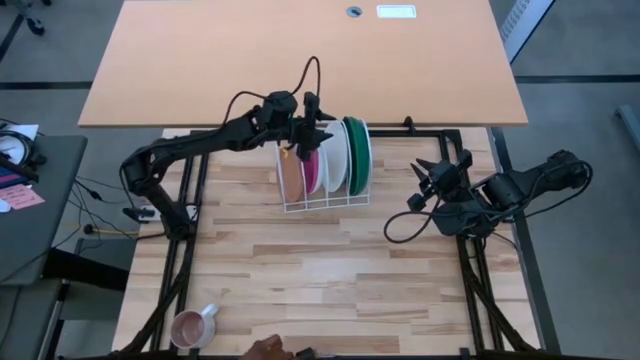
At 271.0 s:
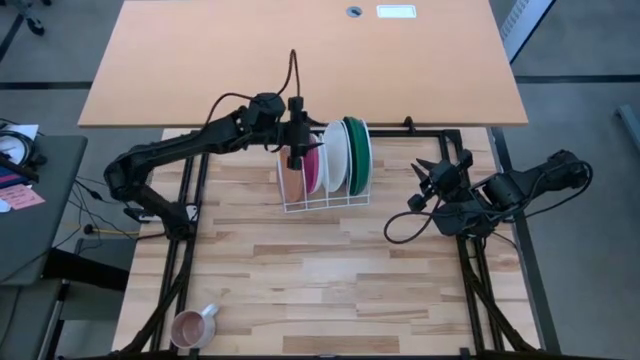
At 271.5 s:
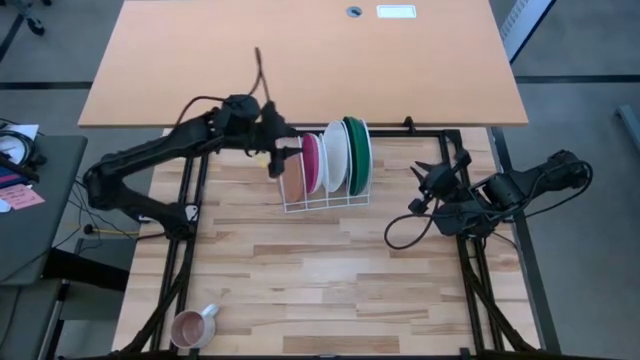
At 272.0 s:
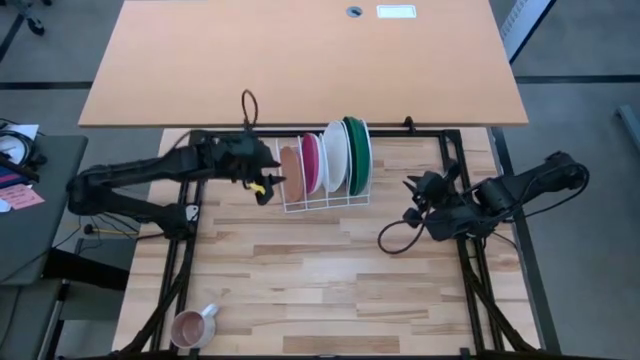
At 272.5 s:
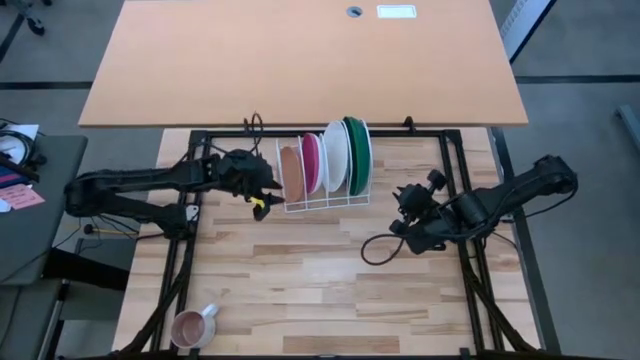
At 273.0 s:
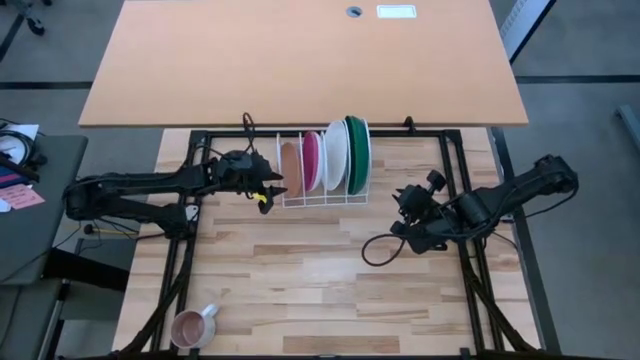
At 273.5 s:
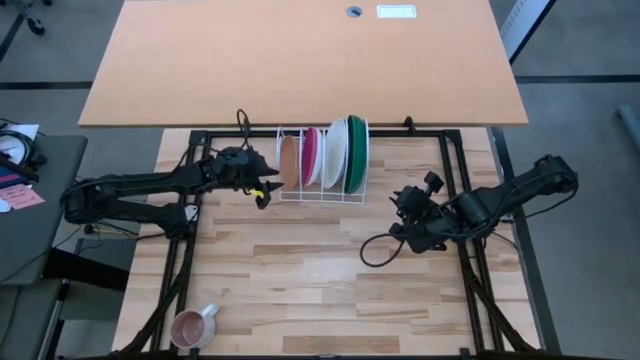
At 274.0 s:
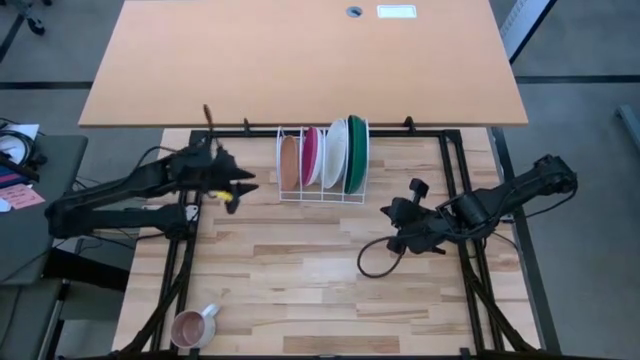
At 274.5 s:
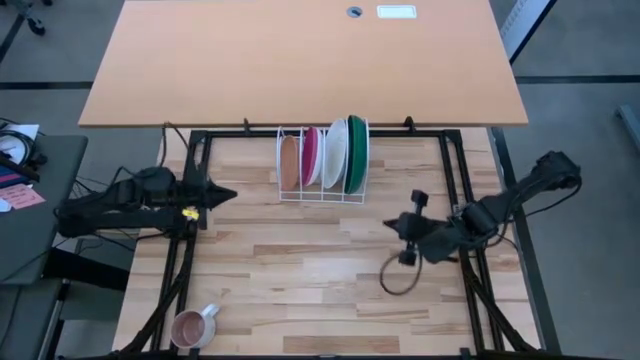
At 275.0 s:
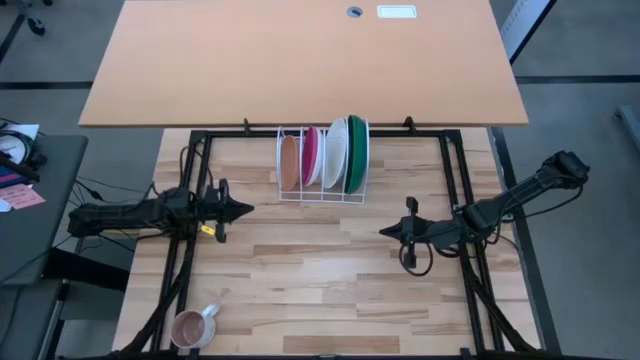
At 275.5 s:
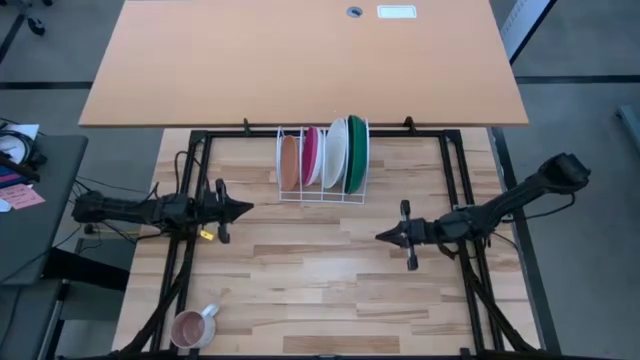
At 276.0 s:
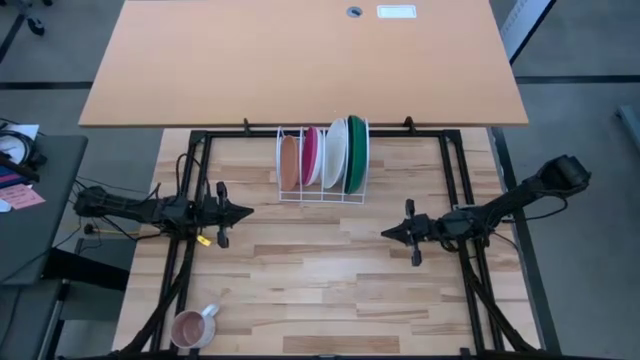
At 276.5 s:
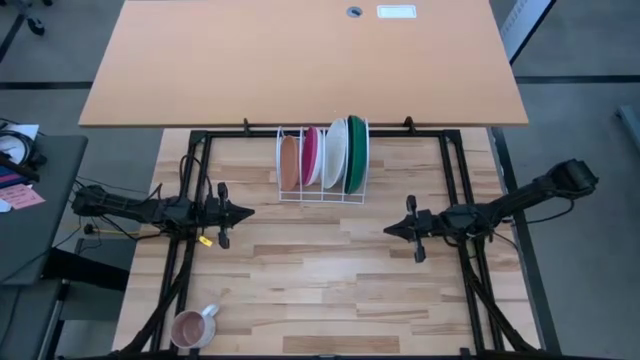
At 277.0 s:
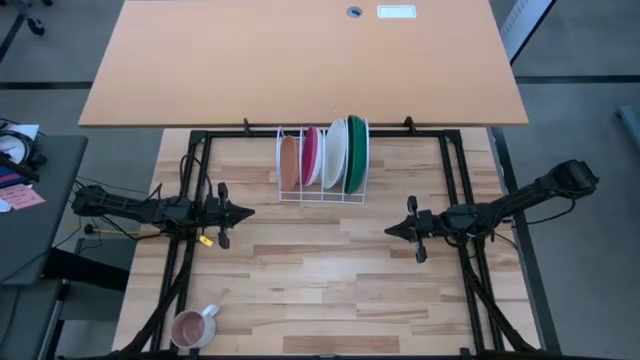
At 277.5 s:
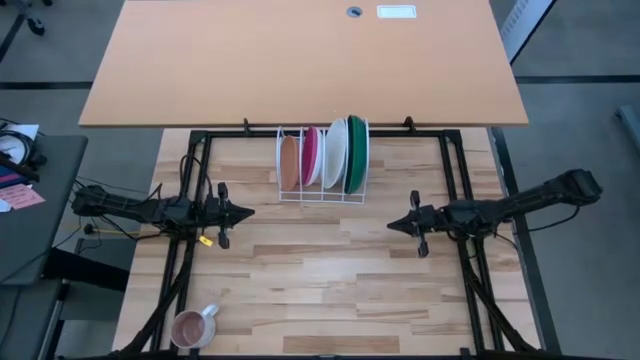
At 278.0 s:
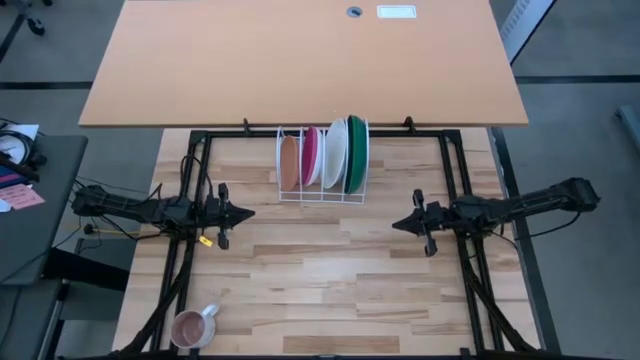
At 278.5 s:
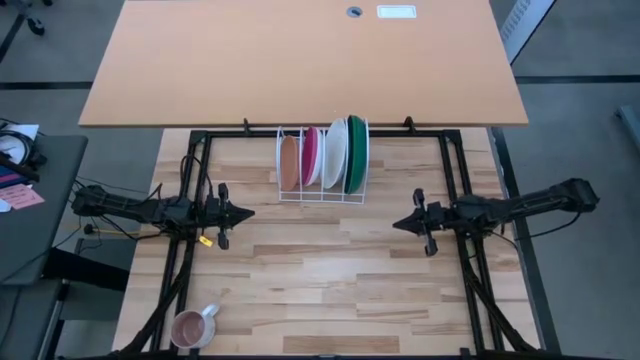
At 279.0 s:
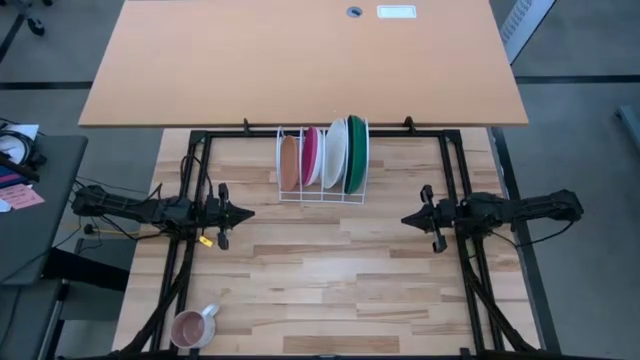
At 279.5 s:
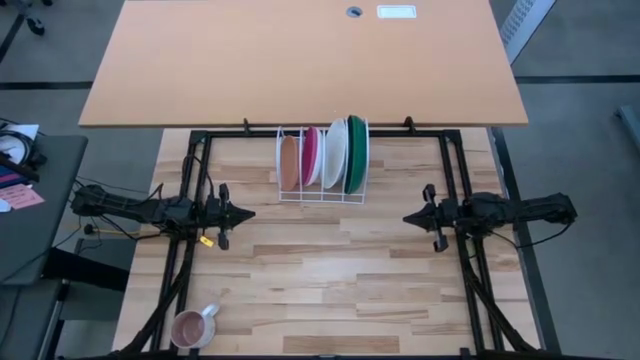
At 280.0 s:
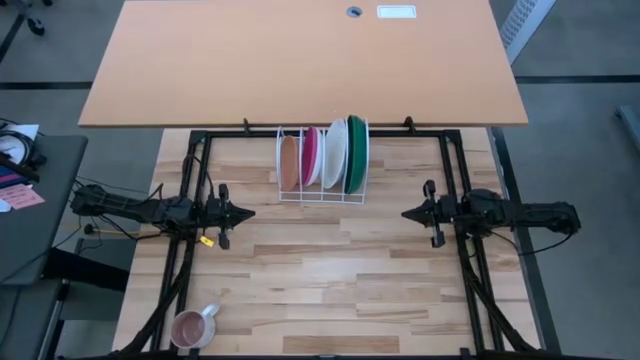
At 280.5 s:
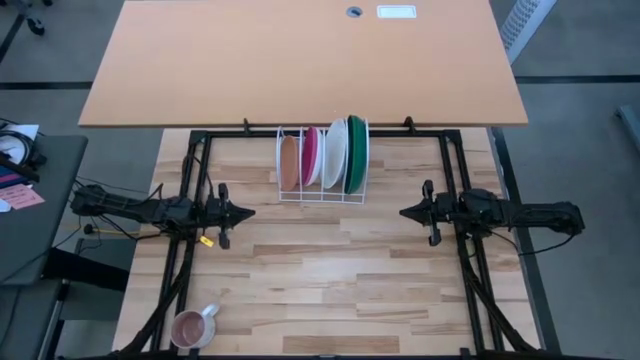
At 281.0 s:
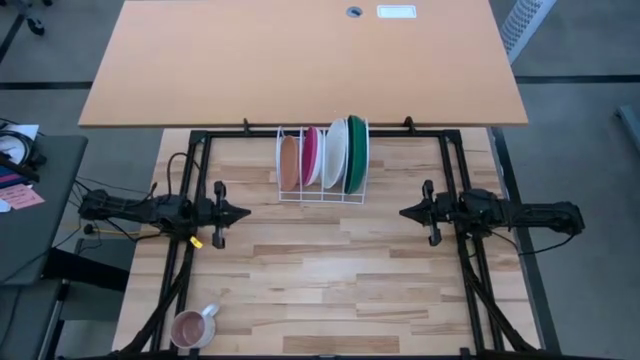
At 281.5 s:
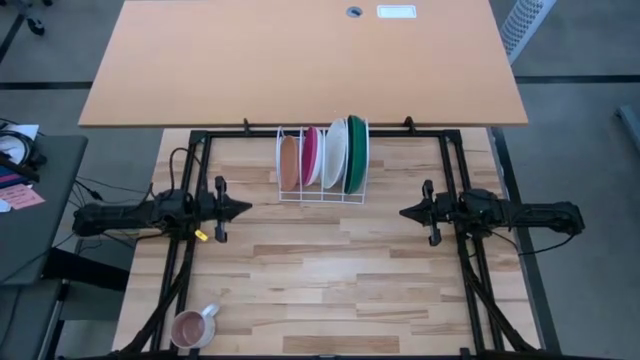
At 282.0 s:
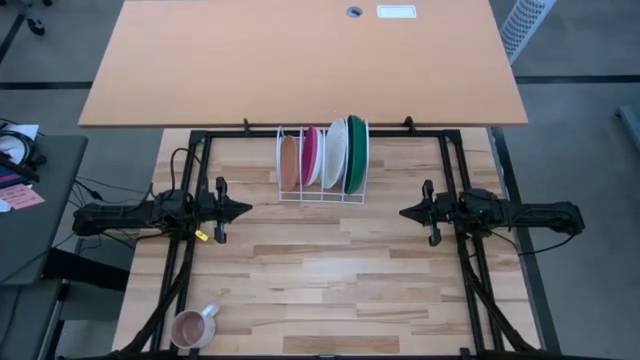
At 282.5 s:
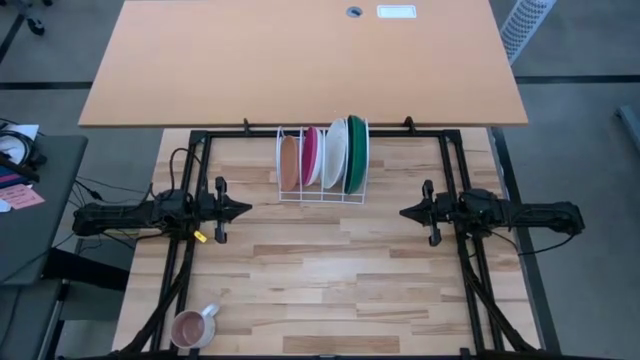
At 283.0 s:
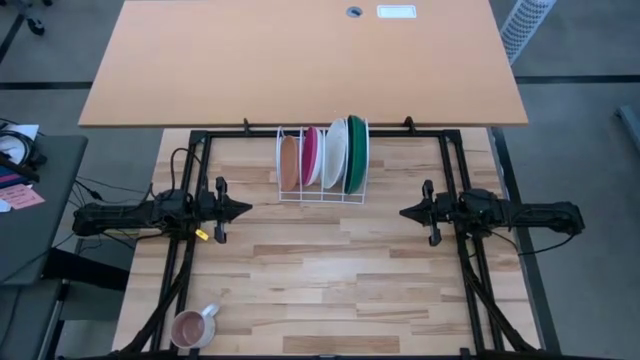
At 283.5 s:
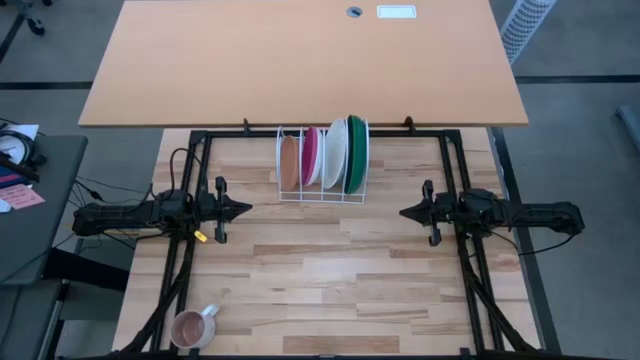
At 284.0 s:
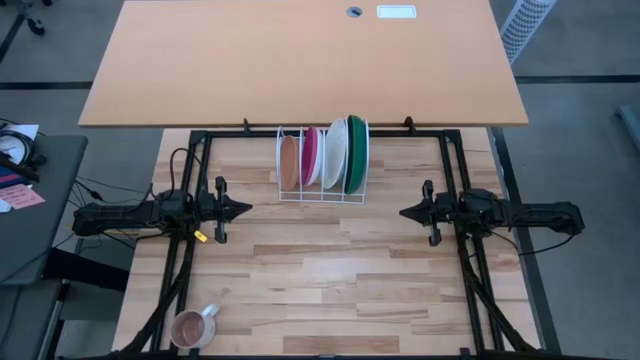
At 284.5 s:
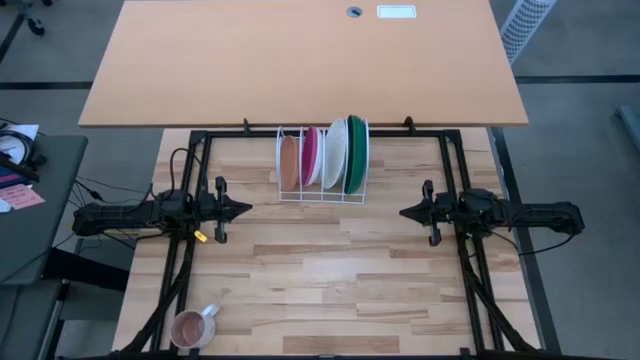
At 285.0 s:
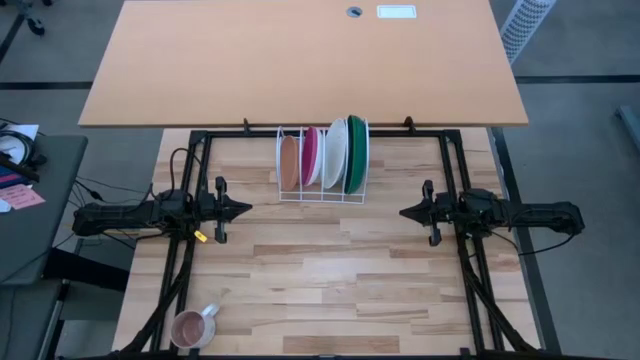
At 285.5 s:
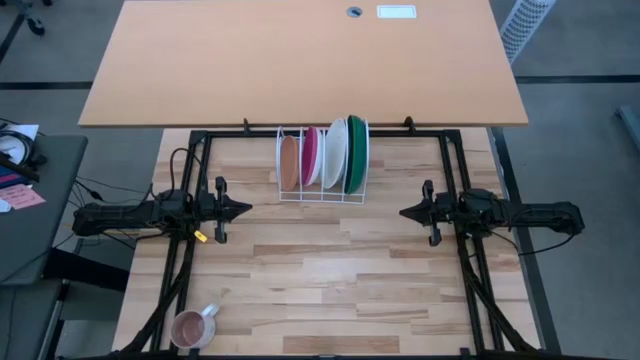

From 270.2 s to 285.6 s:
Task: Sort dishes
Return to Home Position

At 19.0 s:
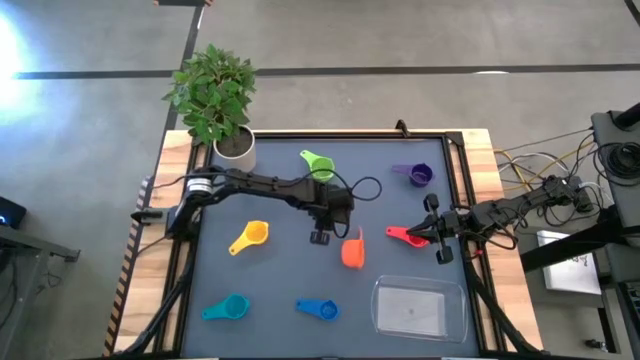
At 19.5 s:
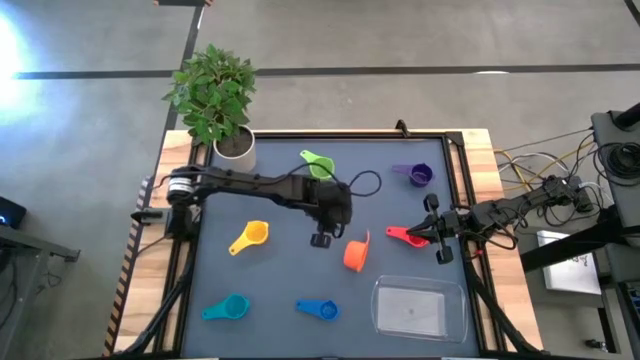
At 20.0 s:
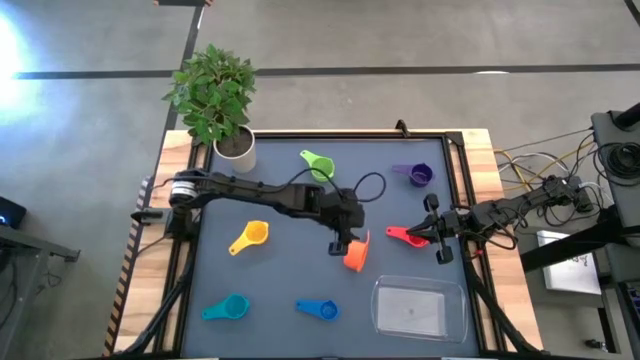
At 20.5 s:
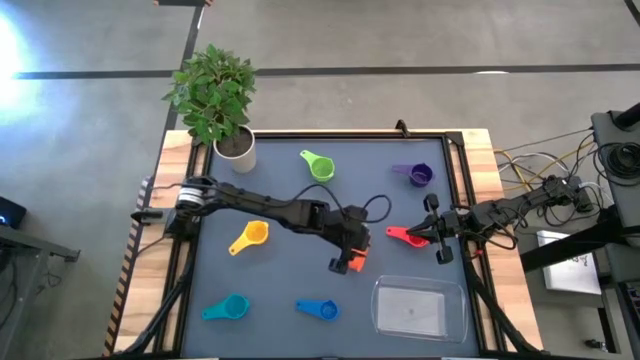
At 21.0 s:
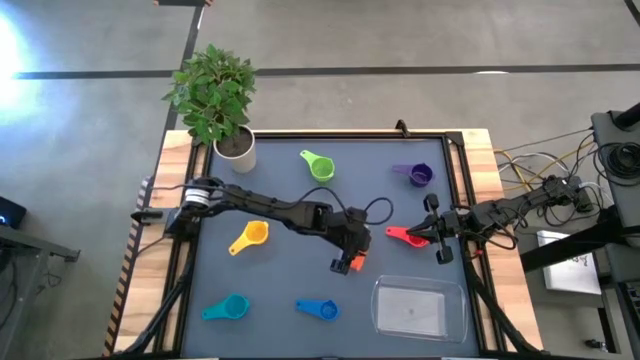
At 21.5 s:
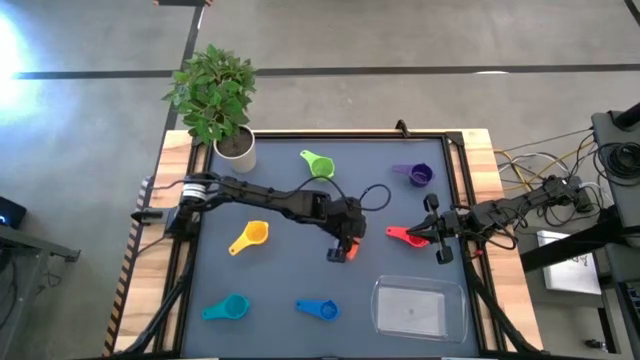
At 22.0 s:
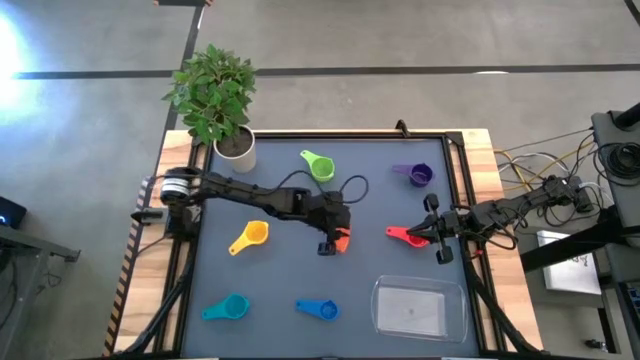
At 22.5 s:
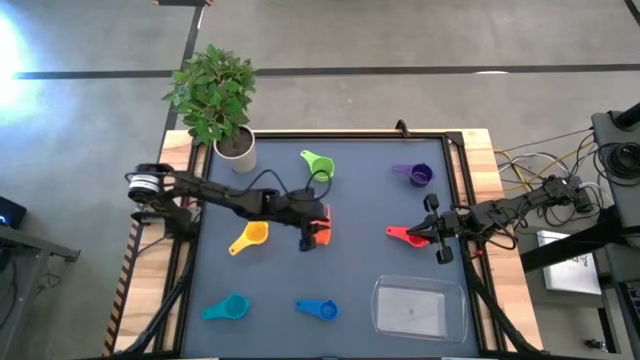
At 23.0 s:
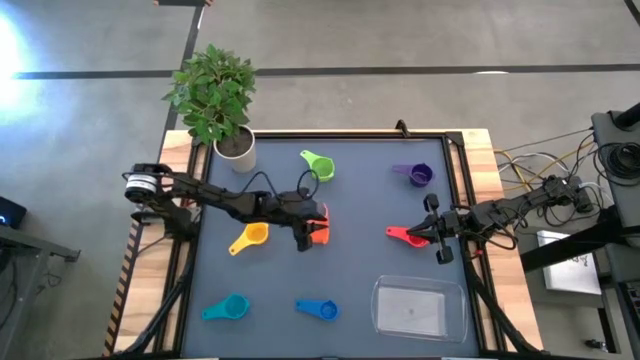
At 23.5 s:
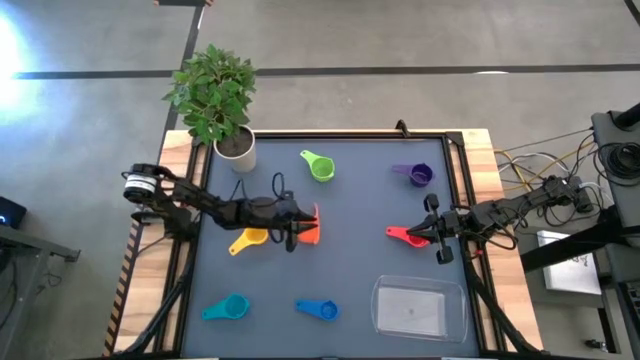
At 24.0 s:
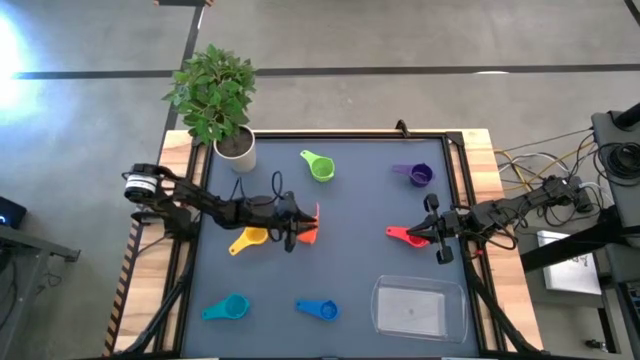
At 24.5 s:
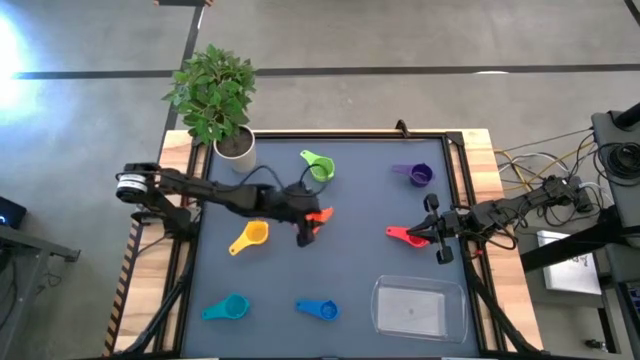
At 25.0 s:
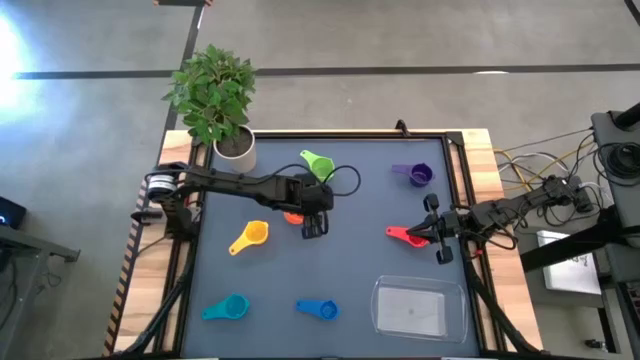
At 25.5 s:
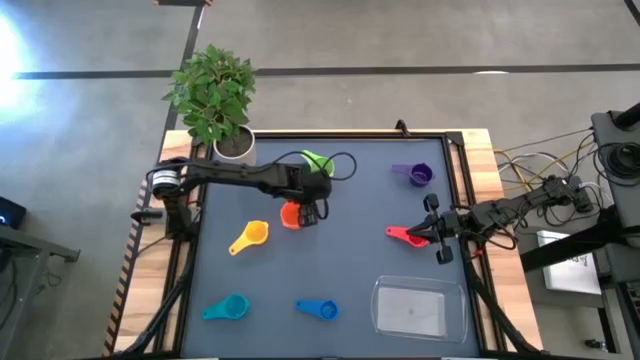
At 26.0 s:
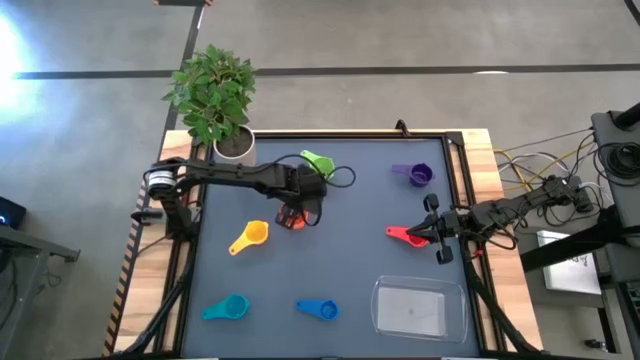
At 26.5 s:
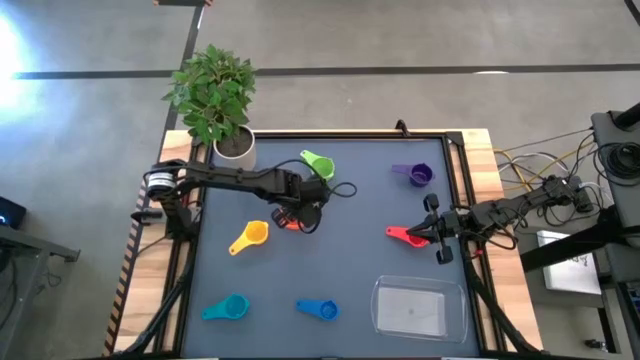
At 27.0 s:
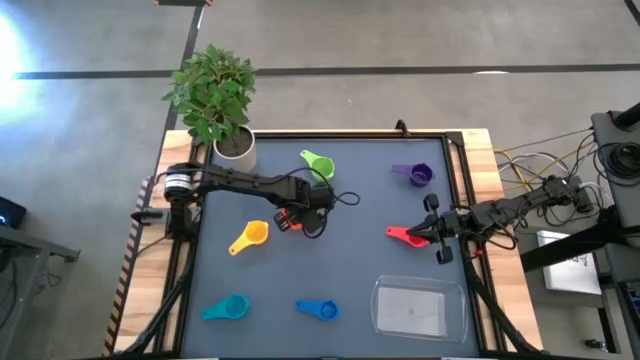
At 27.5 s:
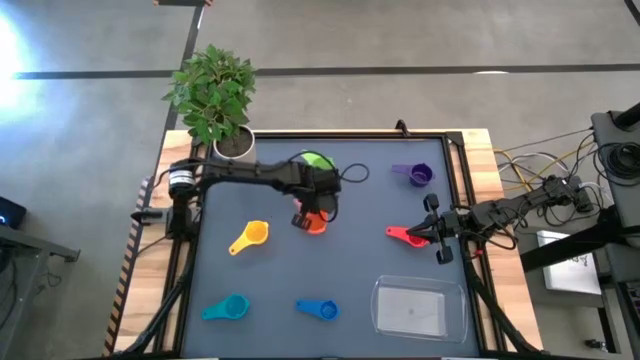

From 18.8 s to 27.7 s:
Task: Nest measuring cups in basket
Adjust the orange measuring cup on the table
